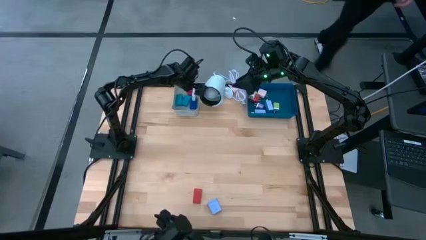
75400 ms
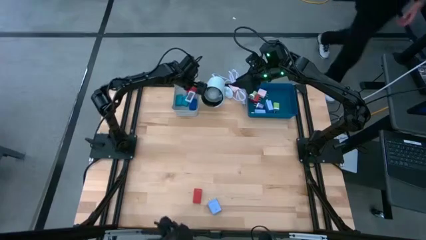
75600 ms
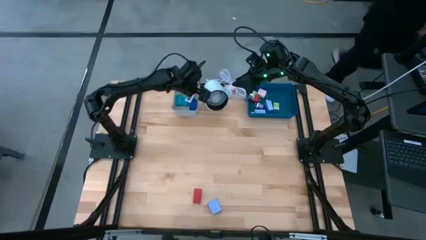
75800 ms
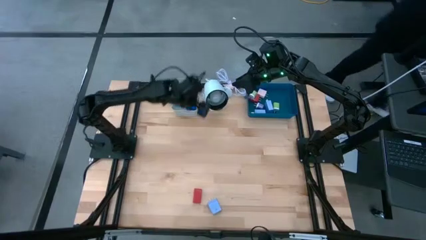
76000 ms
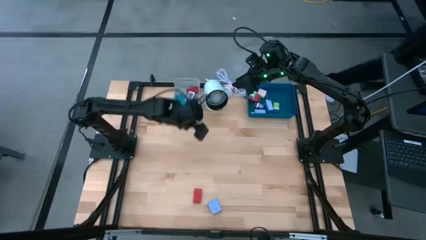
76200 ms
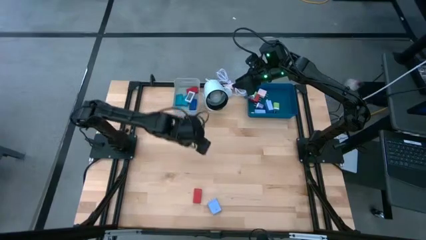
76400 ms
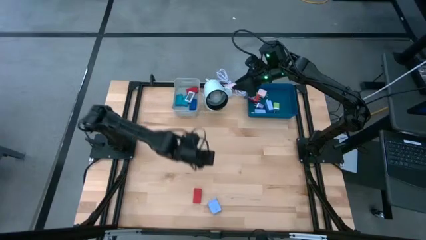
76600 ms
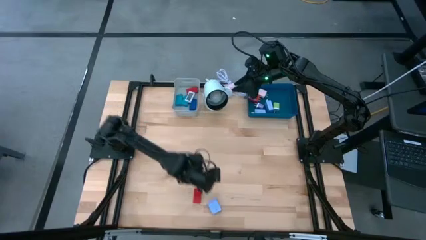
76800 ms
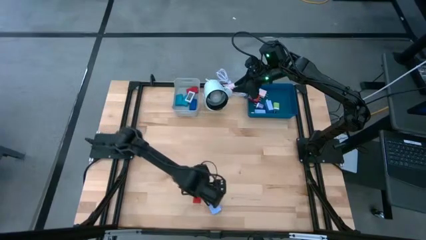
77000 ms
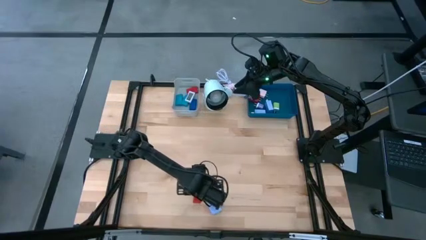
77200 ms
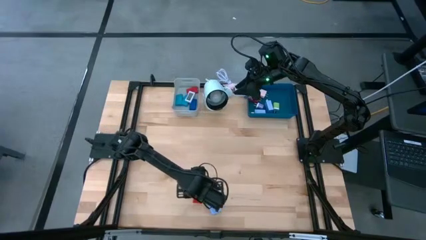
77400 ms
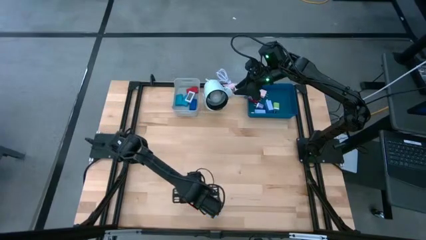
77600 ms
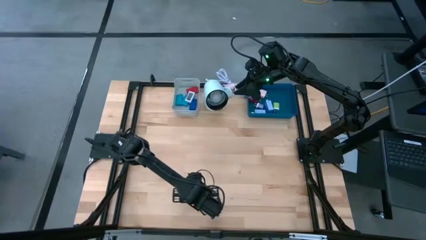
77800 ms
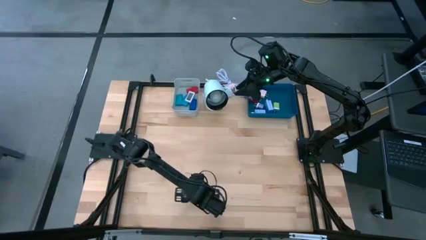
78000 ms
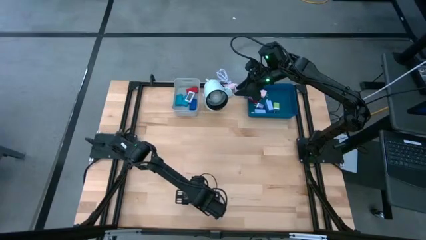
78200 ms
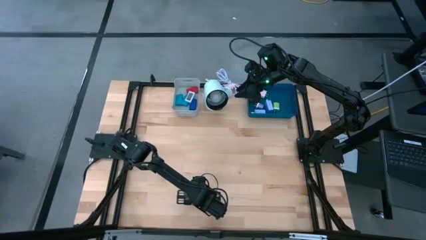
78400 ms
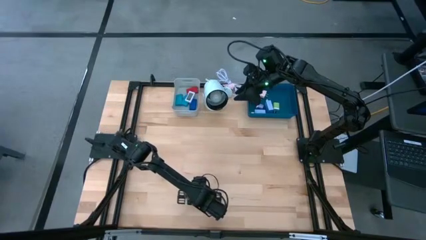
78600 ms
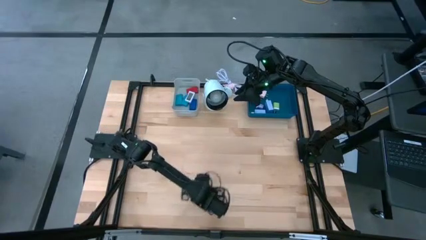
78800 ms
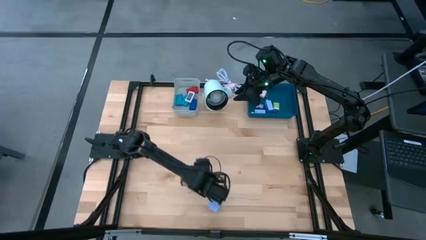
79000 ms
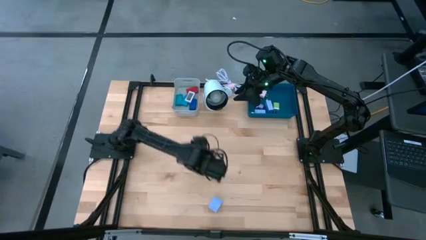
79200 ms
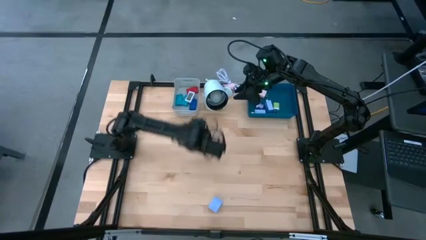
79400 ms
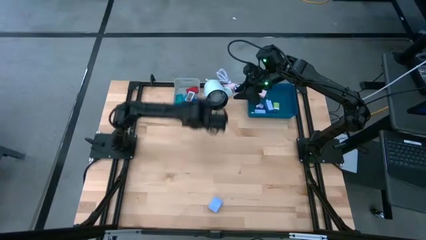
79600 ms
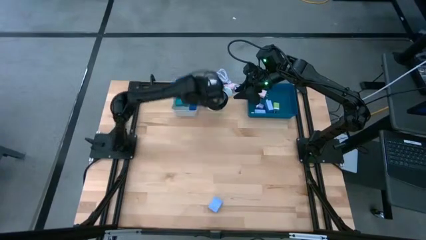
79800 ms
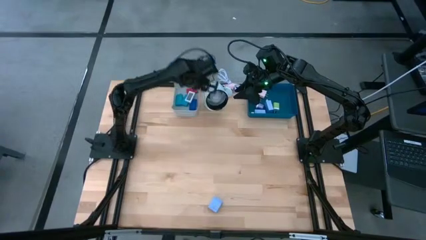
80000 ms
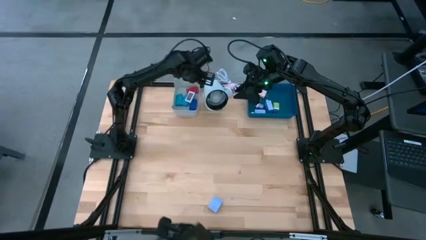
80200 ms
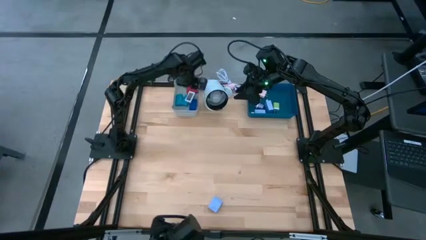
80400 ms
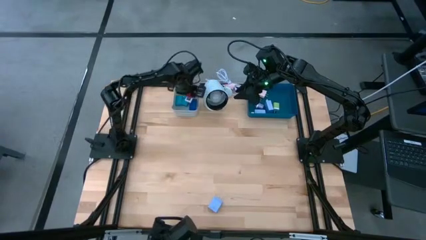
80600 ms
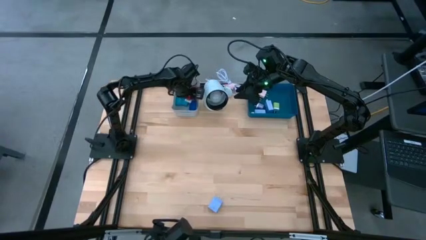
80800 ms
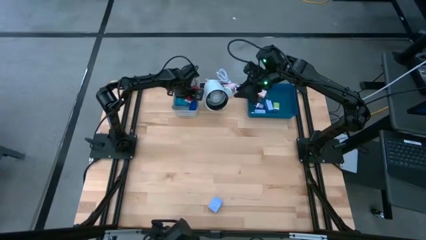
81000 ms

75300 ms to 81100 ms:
Task: Pick & Place Office items
Put the red timer into the gray bin

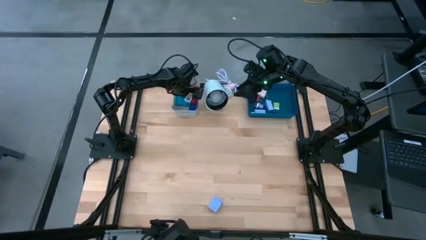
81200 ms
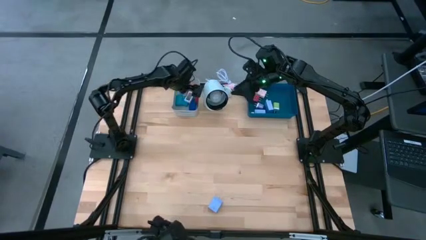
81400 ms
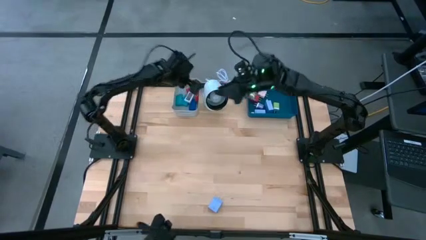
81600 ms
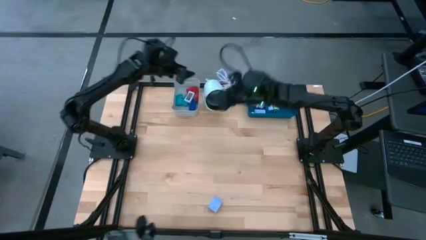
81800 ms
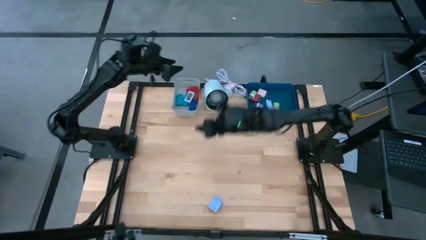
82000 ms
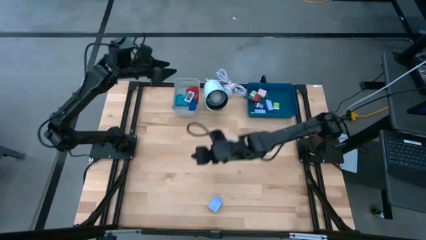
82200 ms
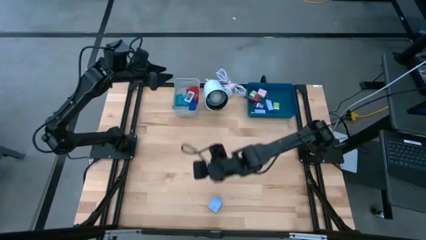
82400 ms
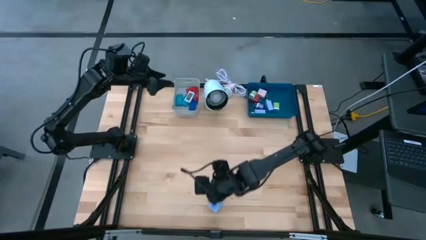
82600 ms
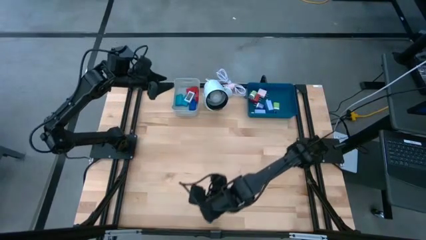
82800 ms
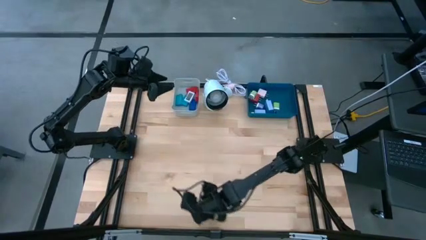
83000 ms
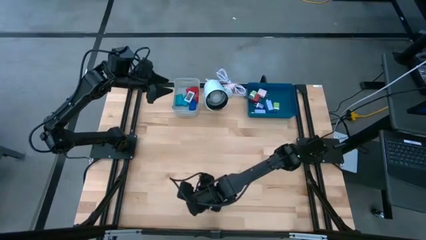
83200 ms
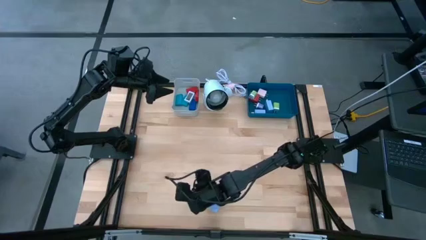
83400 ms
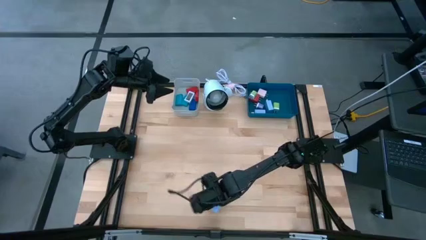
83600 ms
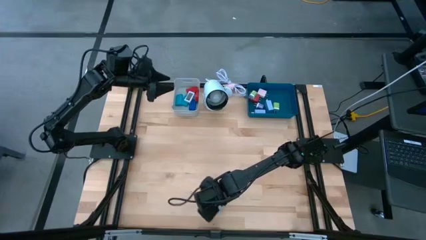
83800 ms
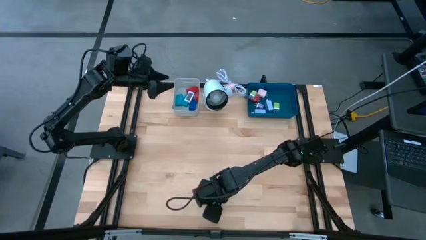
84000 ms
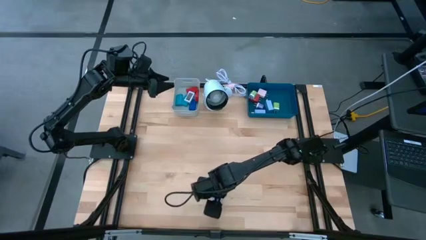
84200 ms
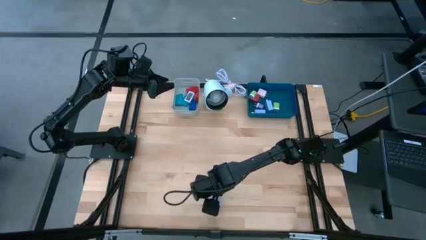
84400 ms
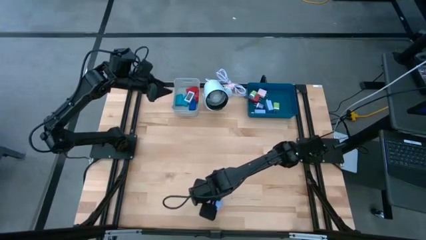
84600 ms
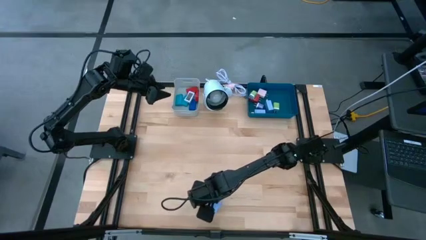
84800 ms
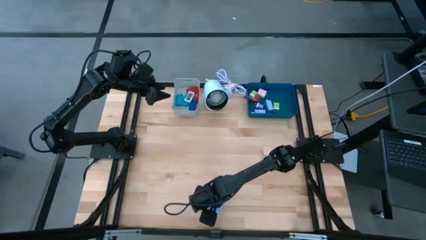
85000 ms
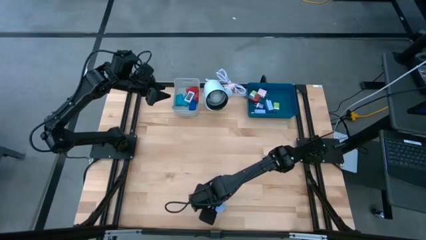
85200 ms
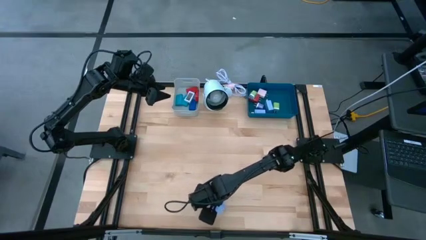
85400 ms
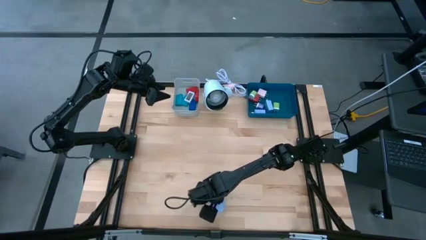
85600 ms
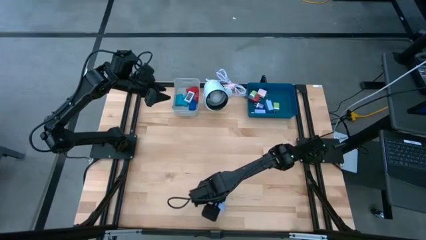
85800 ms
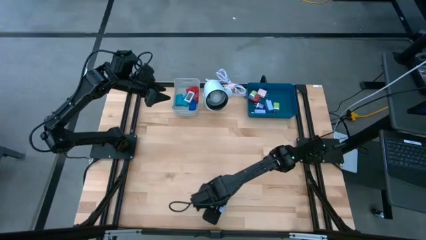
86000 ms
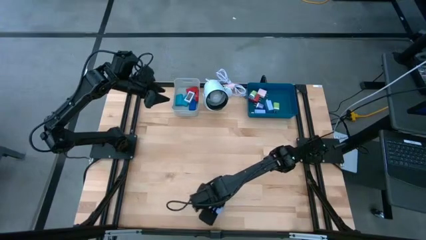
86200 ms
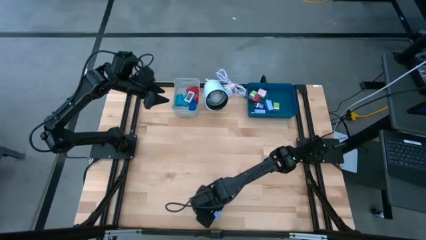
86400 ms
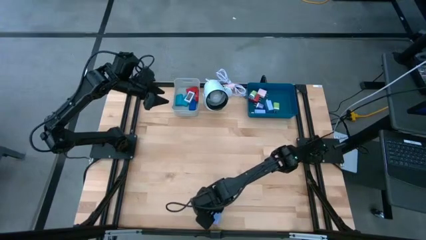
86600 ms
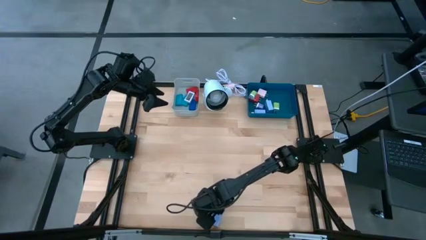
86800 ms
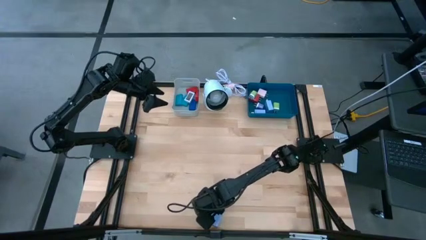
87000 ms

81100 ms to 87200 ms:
Put the light purple charger adapter into the blue bin

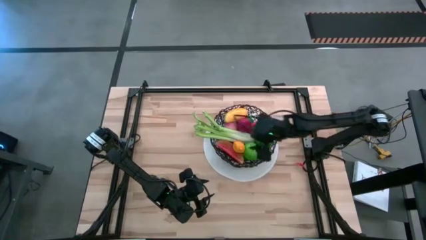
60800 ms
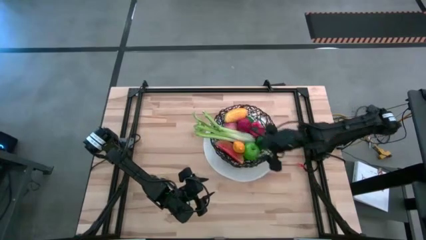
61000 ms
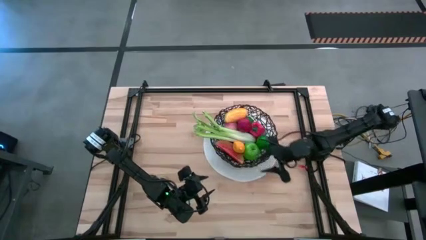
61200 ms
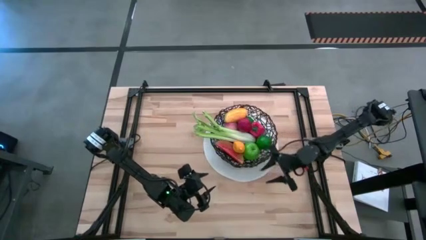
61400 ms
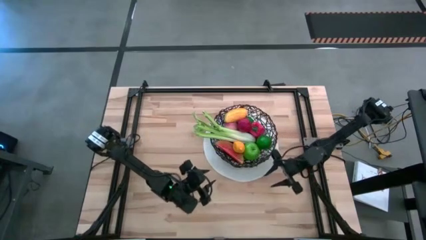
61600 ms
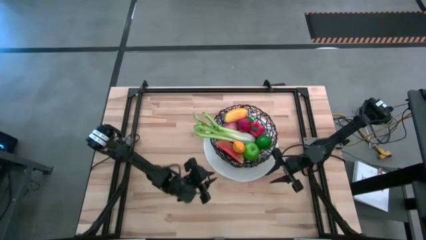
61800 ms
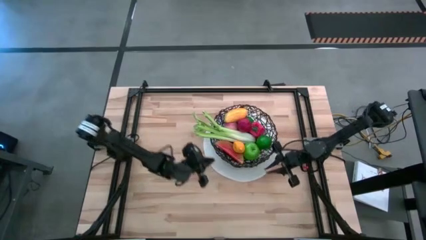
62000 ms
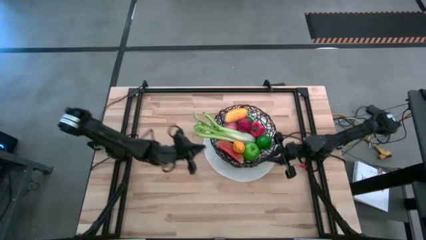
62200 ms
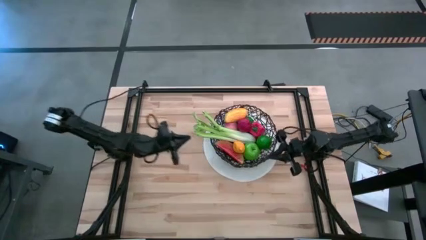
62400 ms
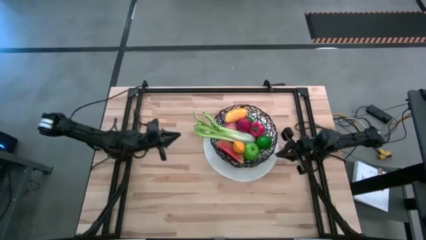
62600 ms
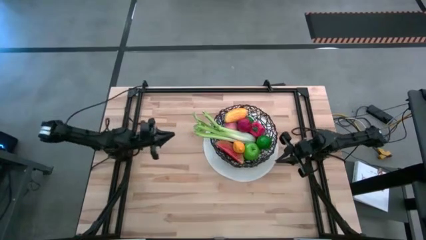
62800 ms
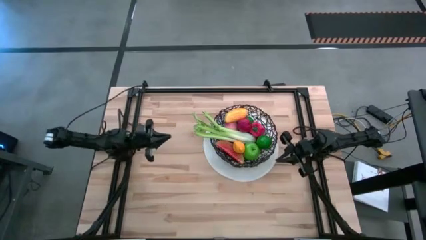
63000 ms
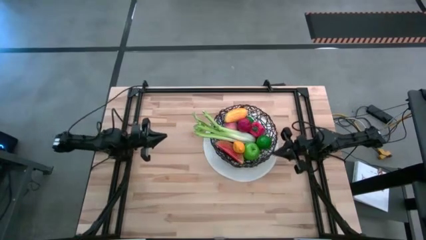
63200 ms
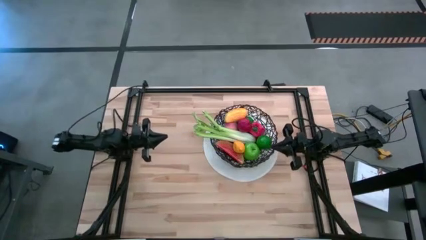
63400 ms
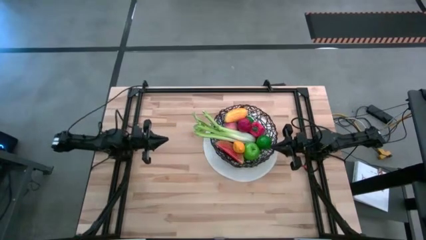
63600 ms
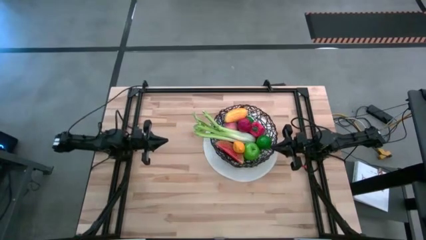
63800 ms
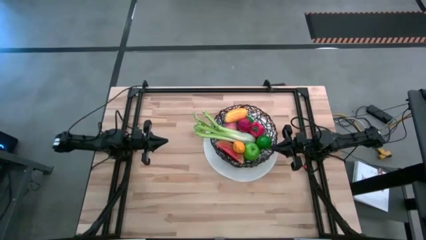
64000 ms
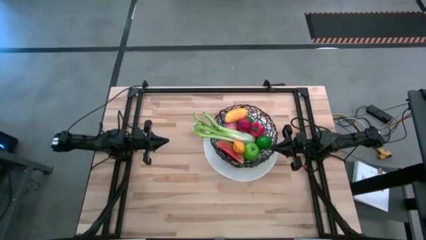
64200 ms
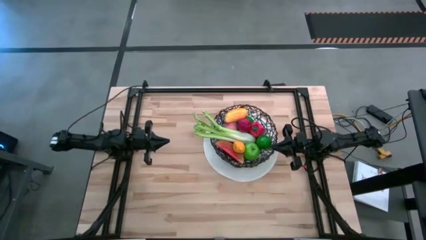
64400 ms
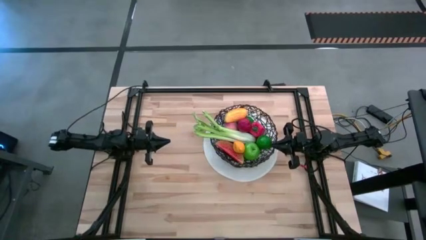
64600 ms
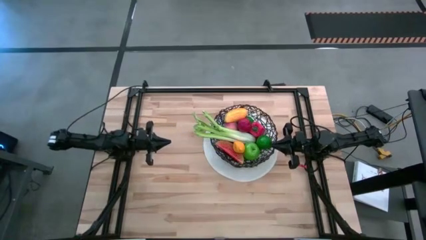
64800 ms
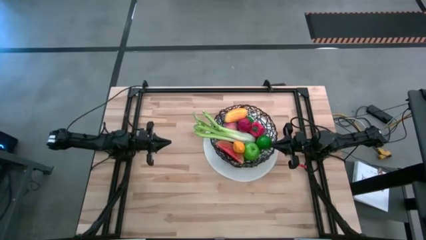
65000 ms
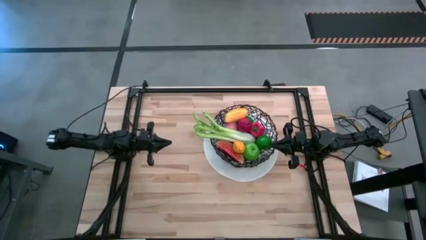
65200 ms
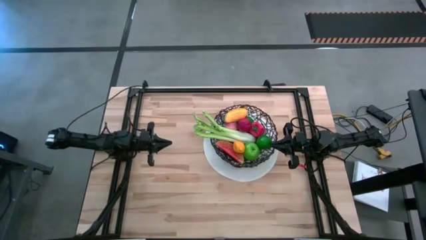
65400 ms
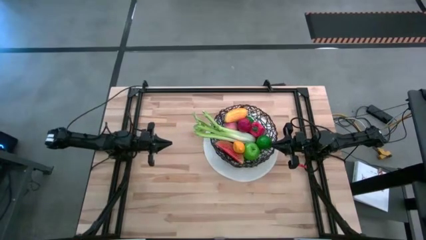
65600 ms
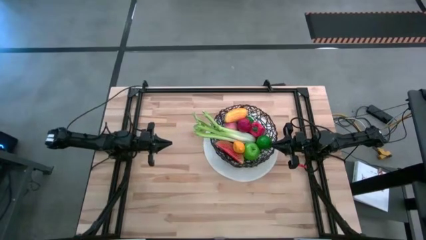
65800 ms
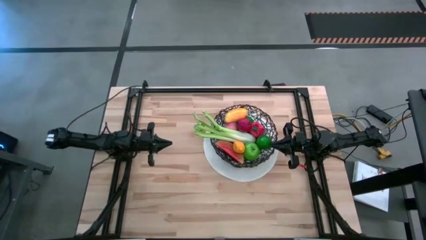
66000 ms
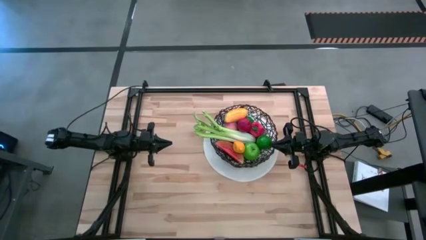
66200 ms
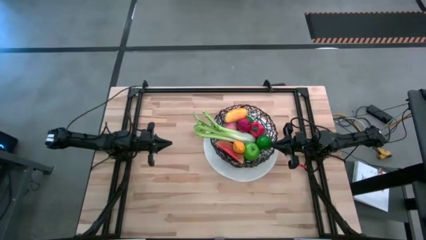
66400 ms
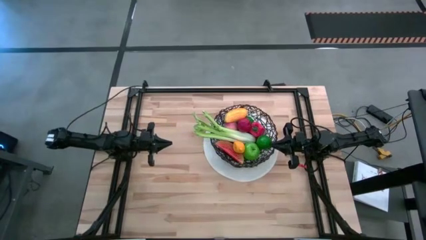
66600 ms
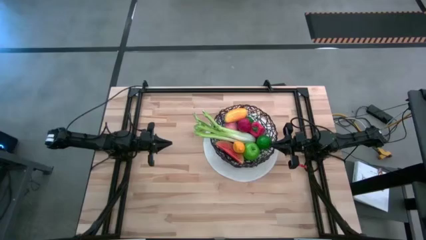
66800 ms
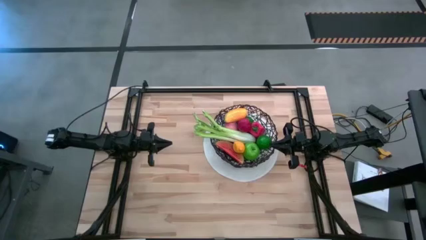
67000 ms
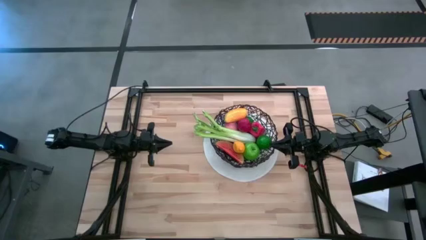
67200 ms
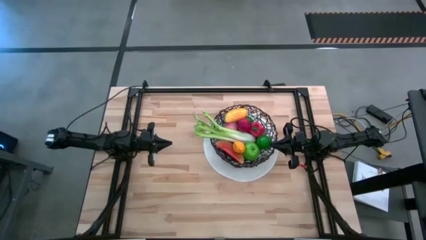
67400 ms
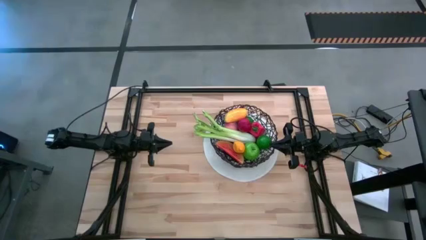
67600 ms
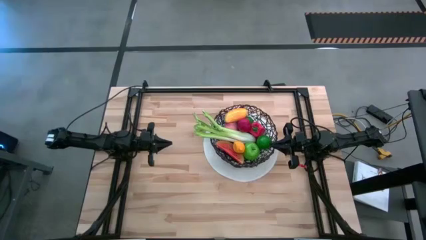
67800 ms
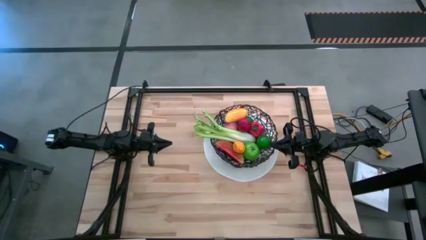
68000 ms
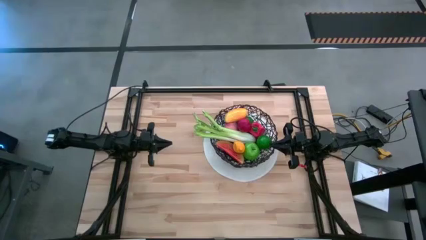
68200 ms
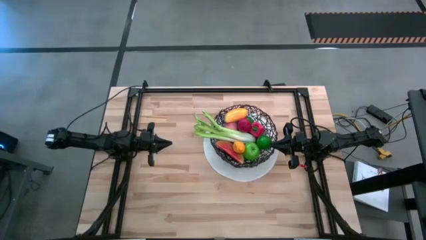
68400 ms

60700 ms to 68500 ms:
Task: Build produce basket
Return to Home Position
